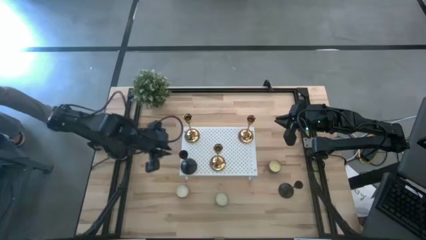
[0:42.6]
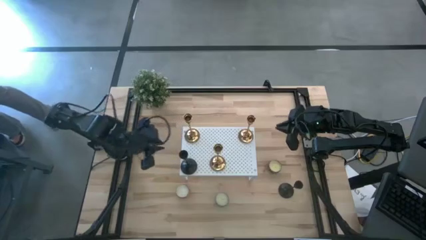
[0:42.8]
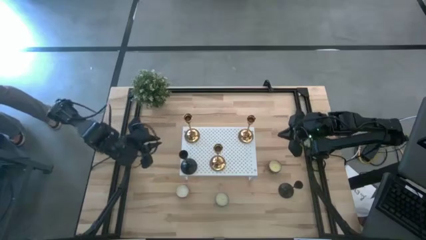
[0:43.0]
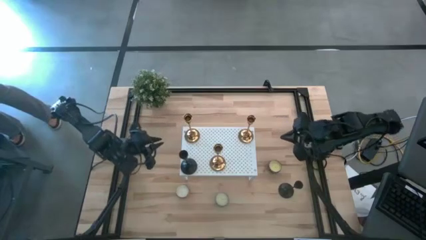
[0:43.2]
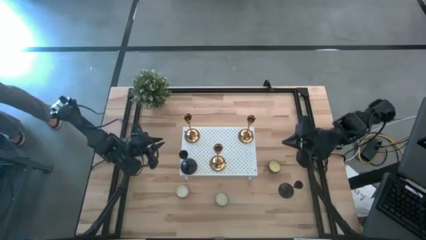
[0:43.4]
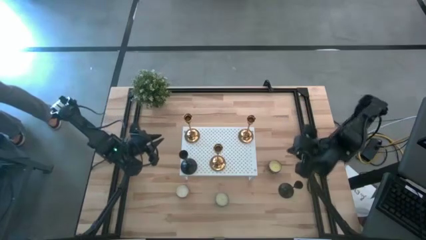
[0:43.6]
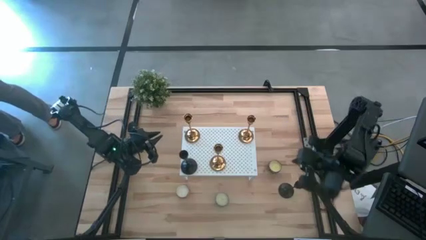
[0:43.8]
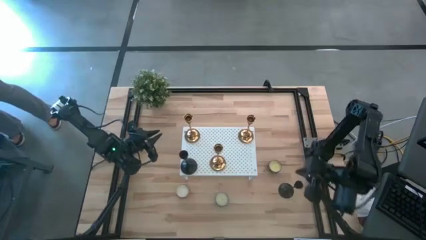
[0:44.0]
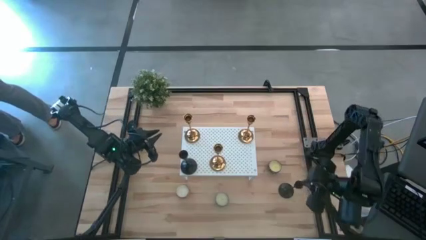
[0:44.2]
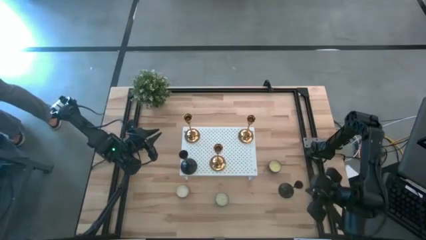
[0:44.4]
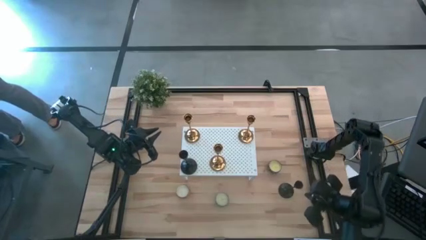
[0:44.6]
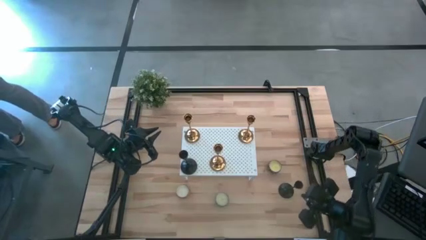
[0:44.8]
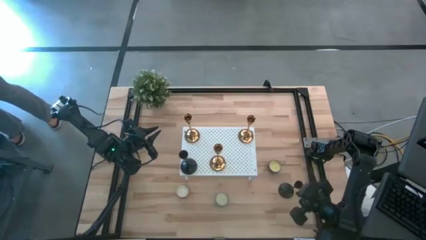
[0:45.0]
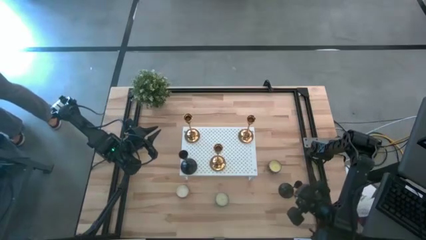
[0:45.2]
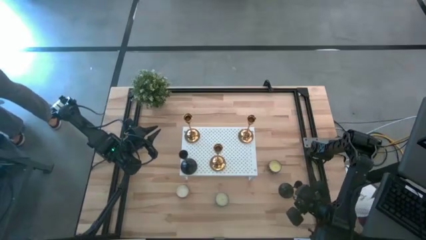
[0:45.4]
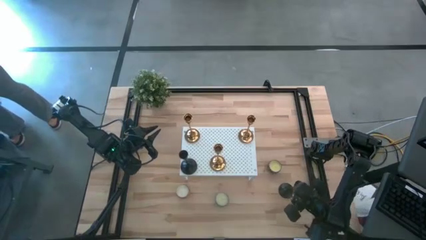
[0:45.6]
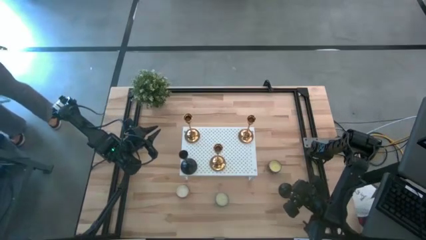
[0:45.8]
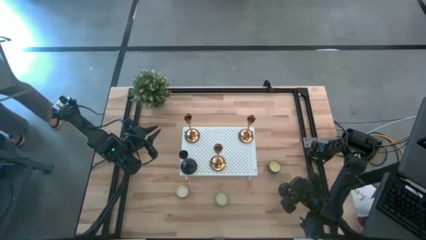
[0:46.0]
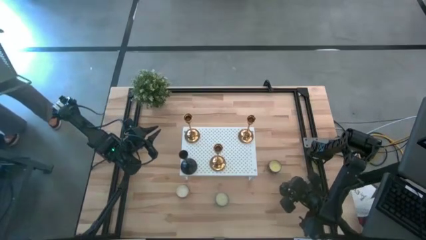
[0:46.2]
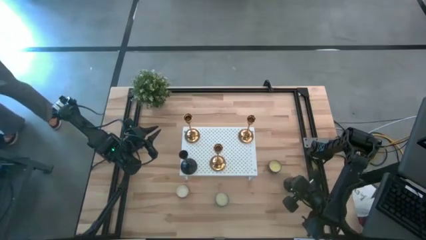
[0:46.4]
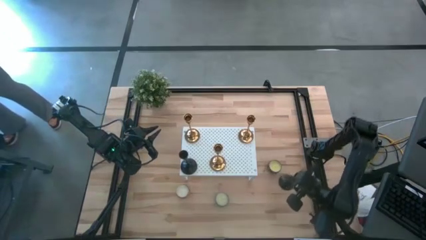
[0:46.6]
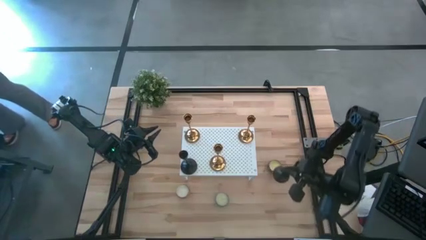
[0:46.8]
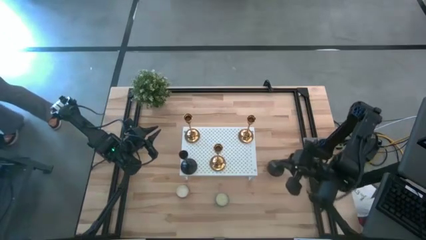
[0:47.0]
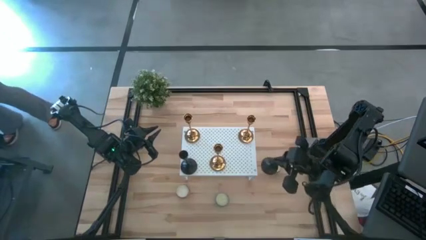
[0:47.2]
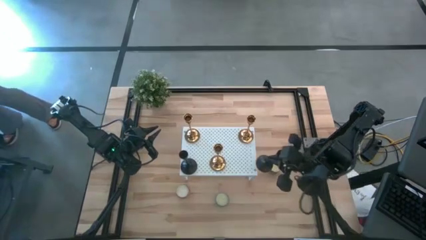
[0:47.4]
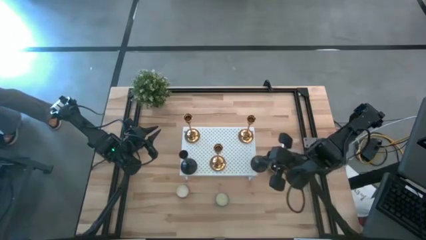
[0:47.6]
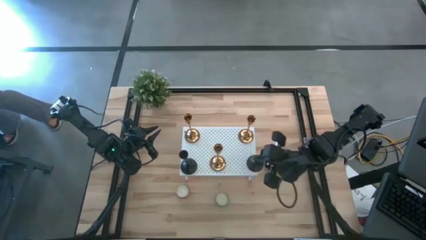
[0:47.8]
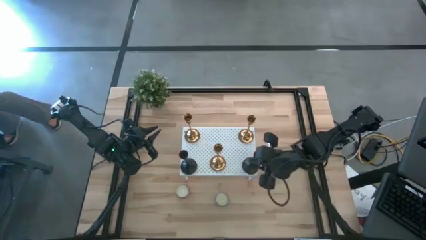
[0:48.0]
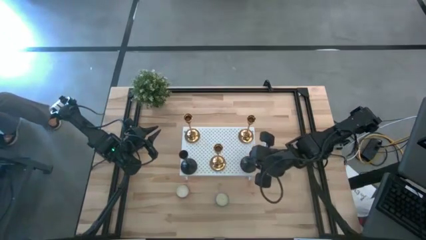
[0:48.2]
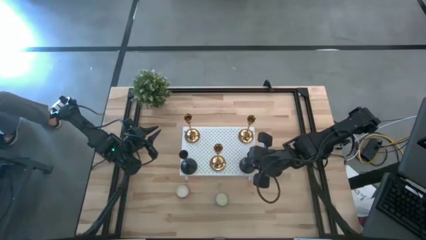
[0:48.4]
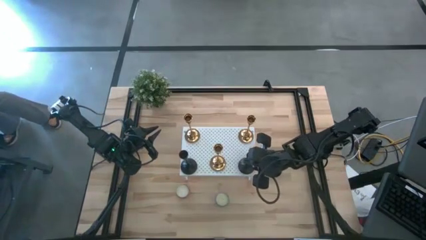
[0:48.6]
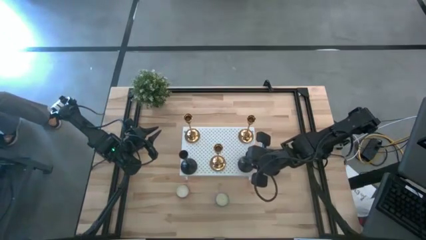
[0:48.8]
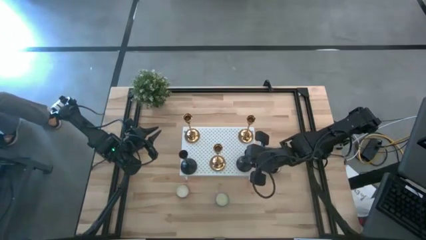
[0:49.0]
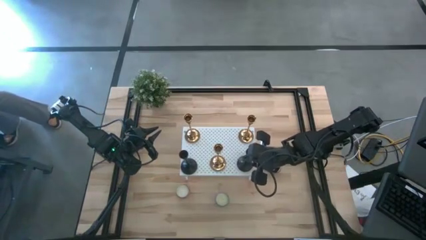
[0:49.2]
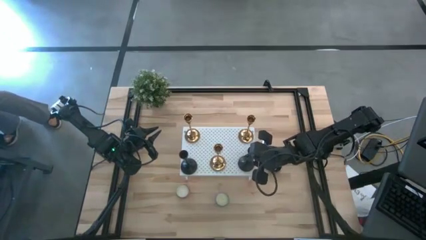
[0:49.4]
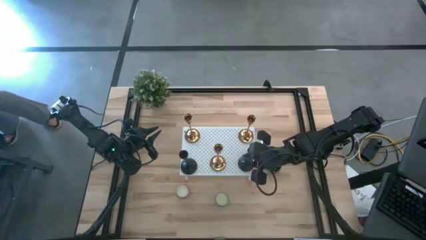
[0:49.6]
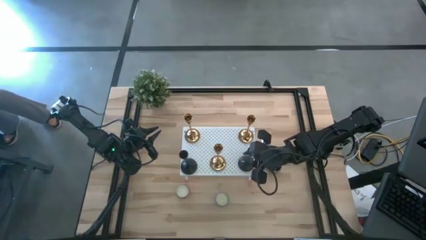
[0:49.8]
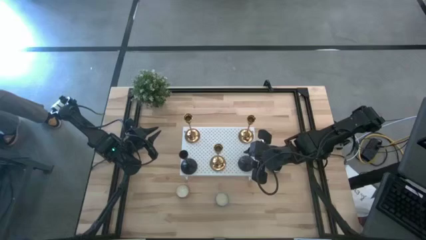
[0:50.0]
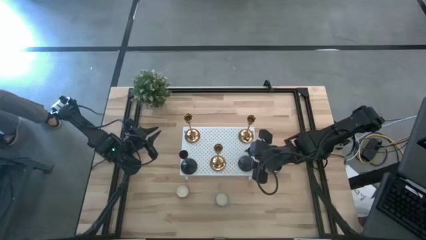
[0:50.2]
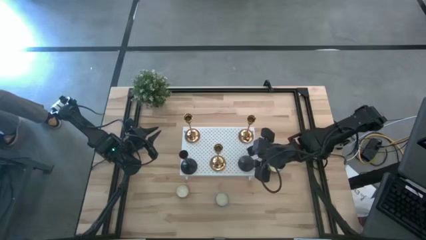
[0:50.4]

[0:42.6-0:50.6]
Task: Pick & Place candle stick holders
Put the black candle holder on the shelf

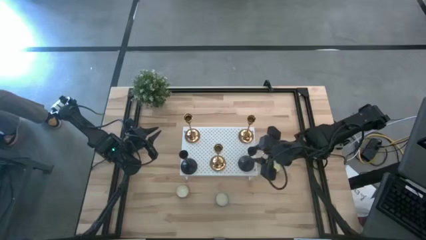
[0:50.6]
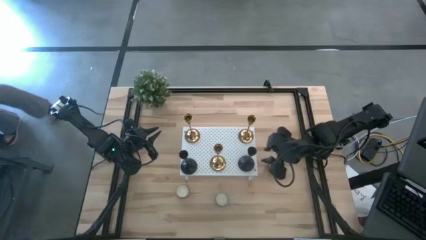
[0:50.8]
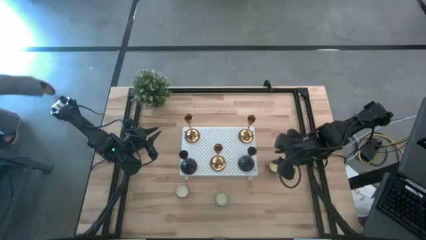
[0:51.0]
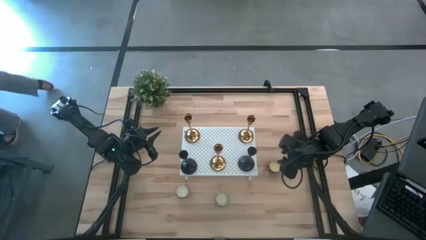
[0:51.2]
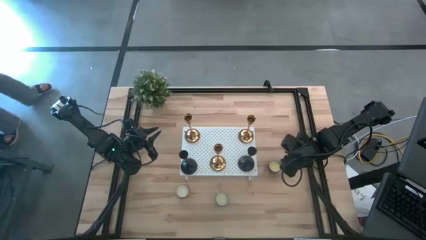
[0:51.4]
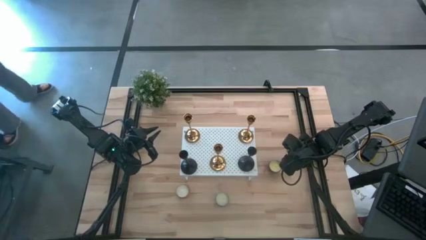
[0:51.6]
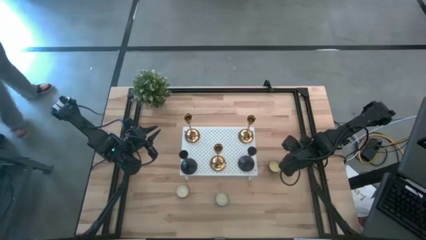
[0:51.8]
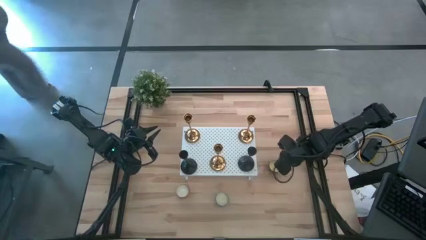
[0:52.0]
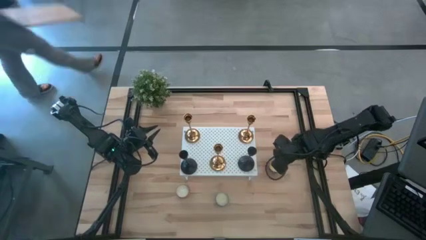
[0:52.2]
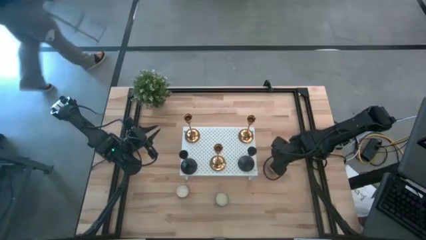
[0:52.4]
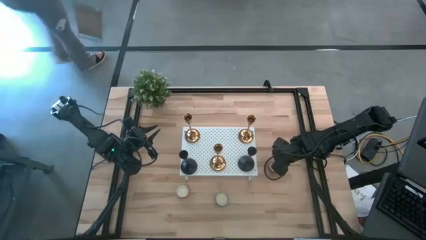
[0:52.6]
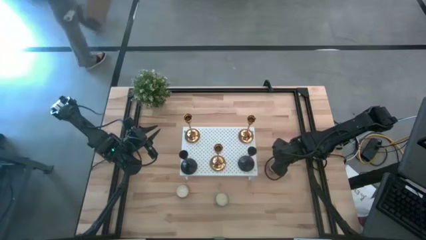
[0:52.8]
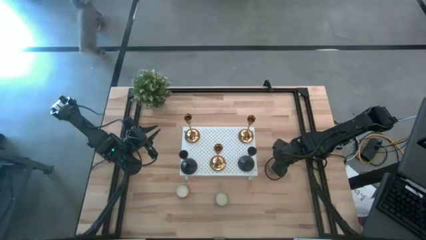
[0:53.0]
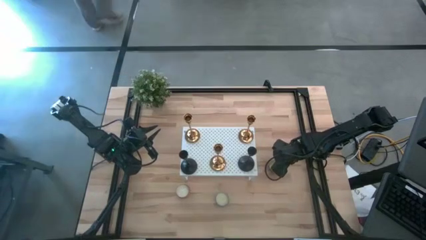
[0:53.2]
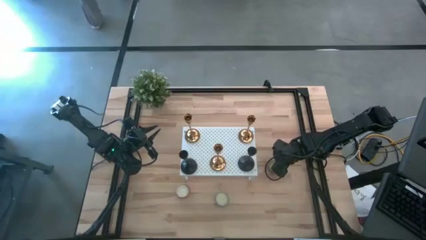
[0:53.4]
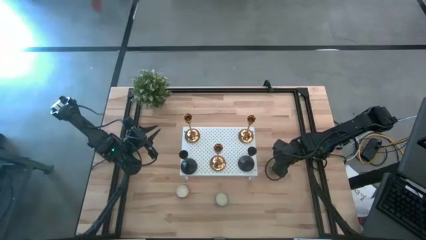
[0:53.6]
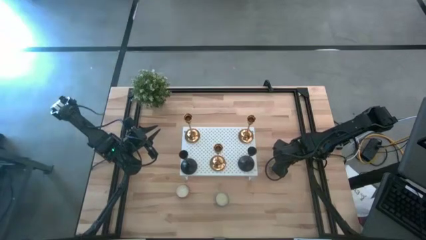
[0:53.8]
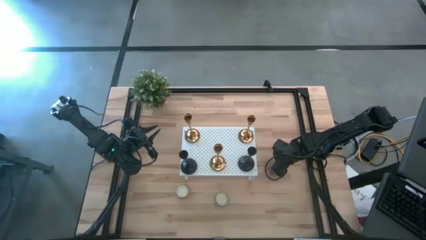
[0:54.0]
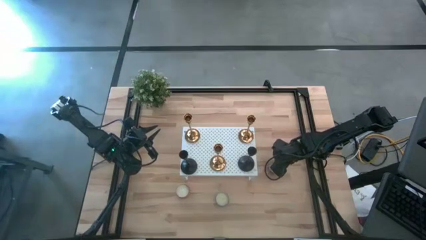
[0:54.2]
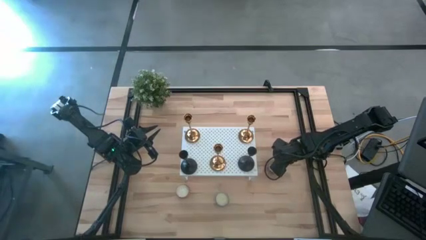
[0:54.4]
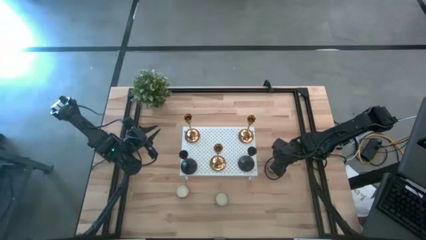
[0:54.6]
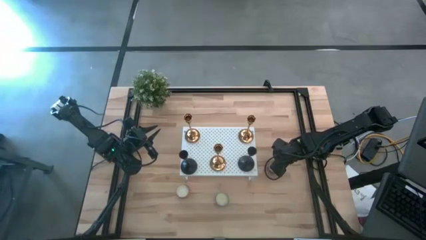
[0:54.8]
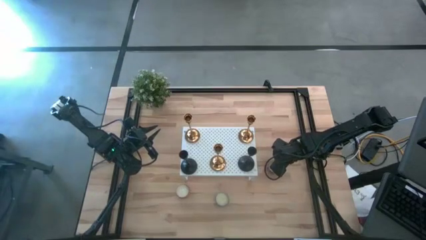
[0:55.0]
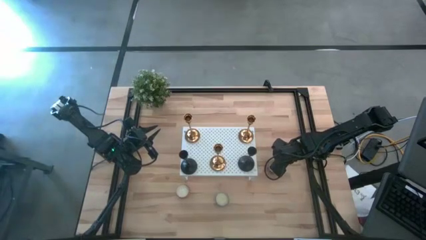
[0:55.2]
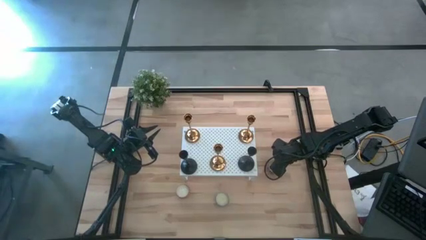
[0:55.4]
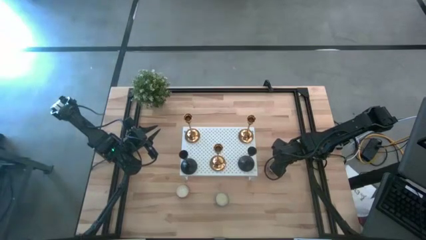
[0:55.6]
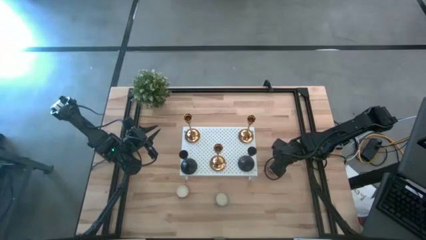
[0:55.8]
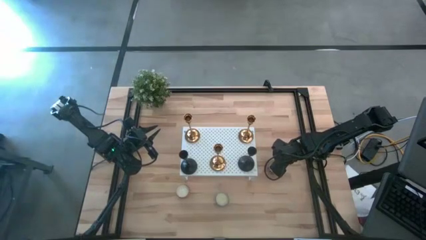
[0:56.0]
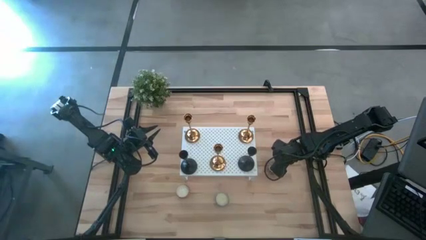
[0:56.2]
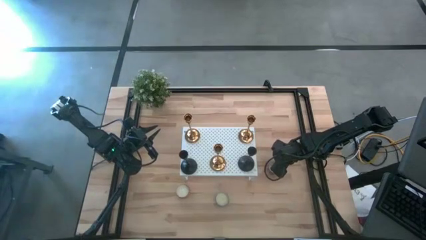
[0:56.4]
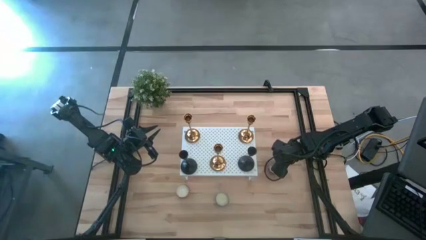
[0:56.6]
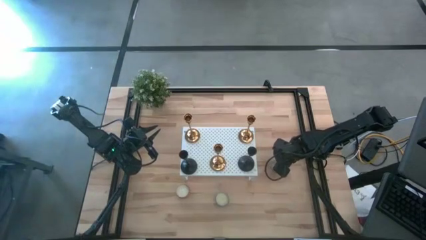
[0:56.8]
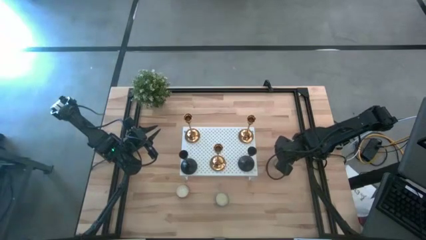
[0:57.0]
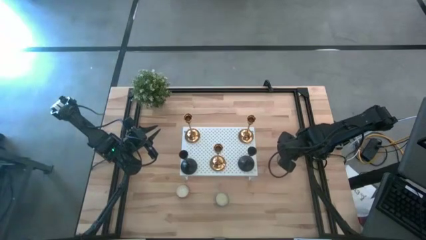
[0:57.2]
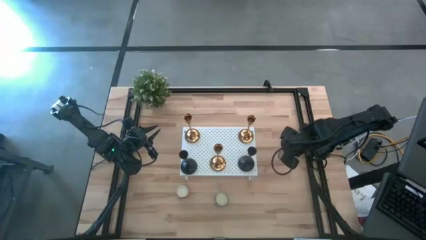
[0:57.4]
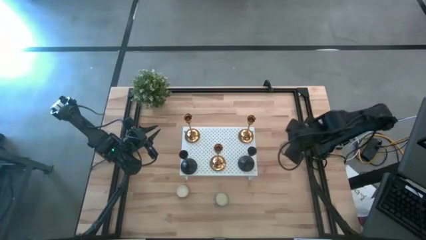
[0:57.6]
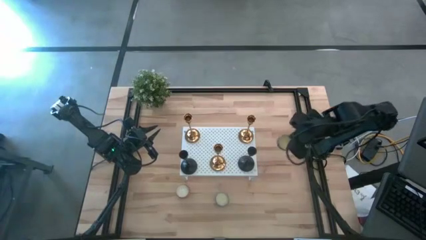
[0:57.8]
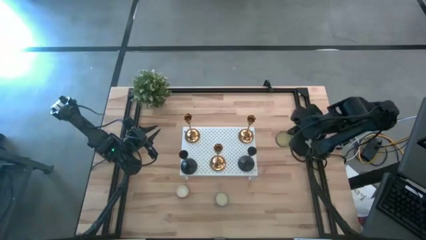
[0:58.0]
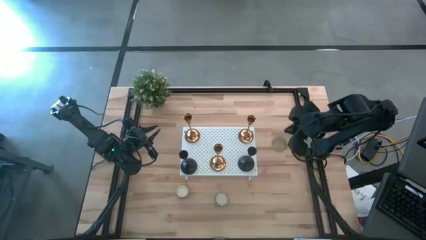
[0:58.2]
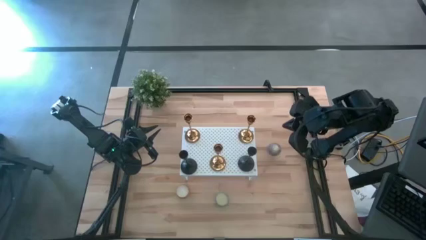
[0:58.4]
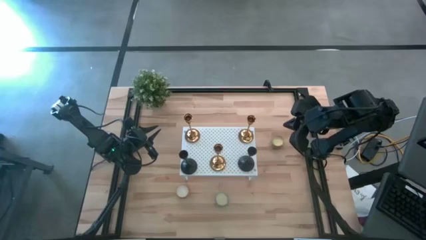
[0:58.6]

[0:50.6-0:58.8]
Put the right scented candle on the shelf
